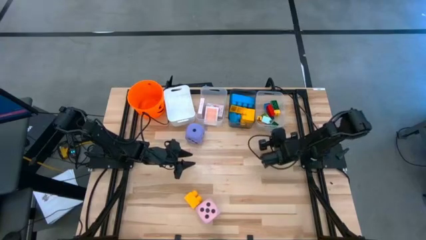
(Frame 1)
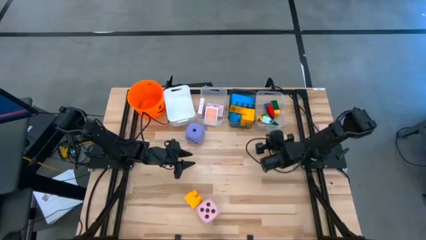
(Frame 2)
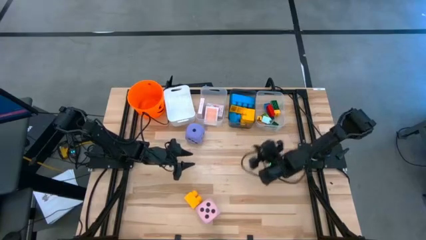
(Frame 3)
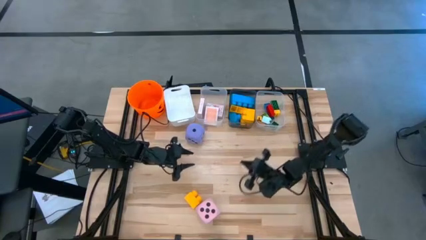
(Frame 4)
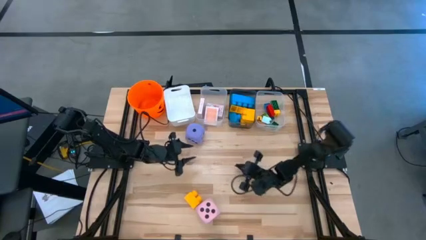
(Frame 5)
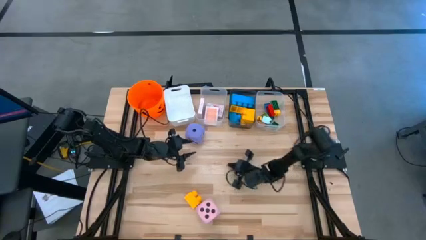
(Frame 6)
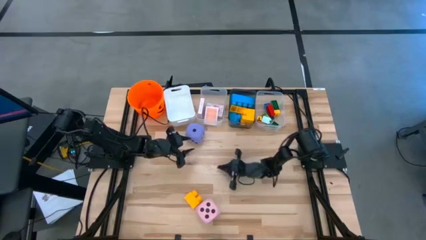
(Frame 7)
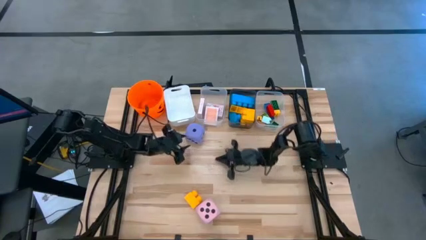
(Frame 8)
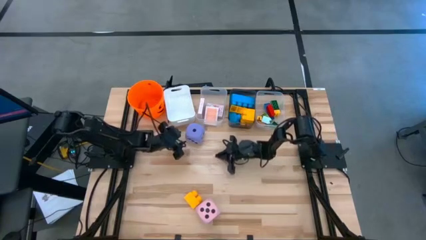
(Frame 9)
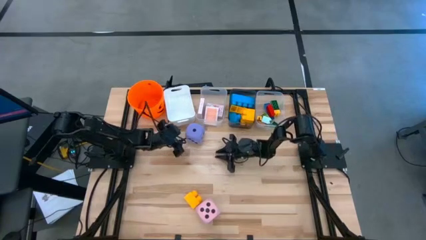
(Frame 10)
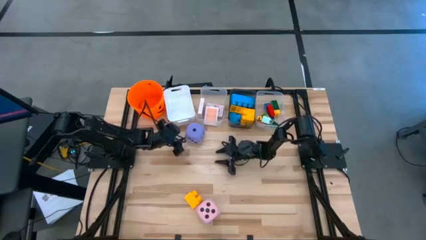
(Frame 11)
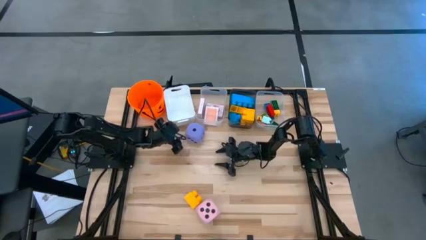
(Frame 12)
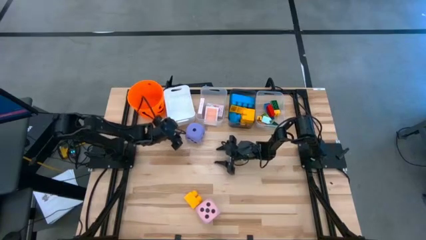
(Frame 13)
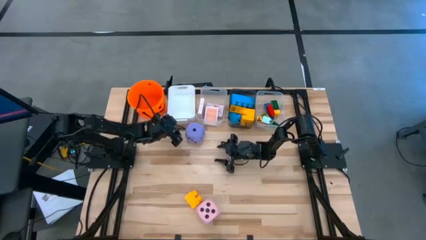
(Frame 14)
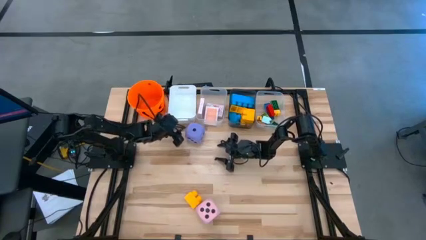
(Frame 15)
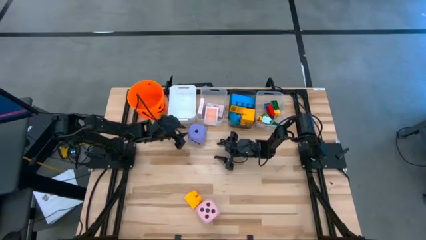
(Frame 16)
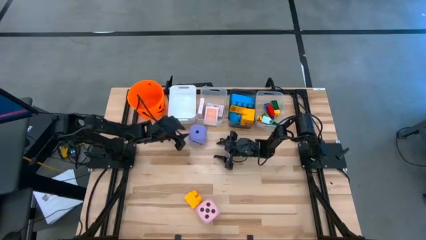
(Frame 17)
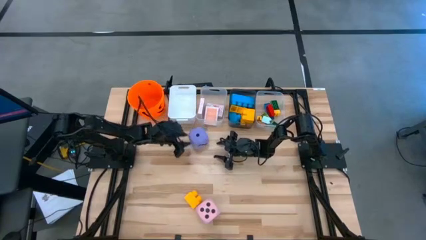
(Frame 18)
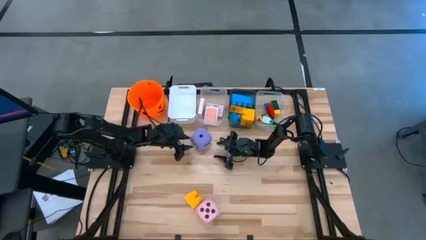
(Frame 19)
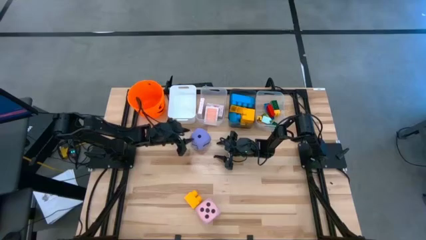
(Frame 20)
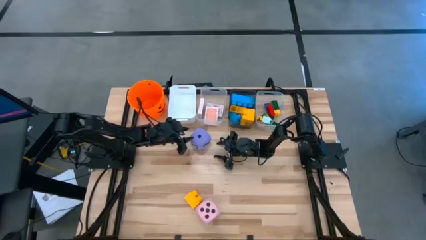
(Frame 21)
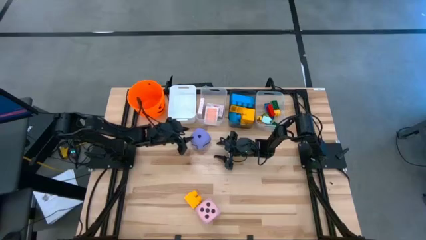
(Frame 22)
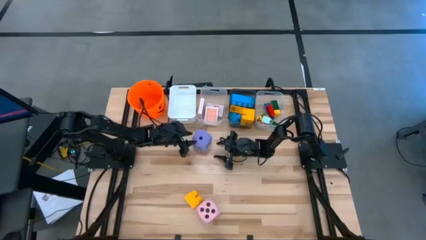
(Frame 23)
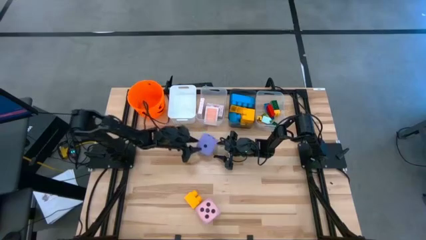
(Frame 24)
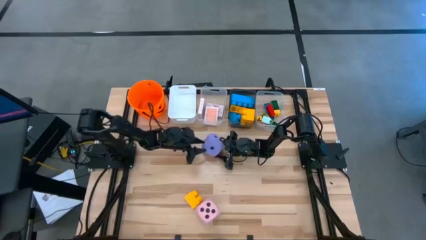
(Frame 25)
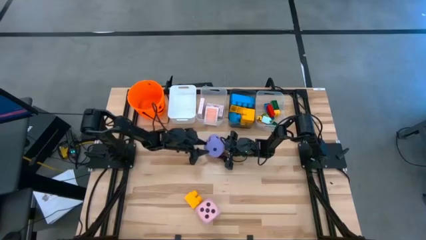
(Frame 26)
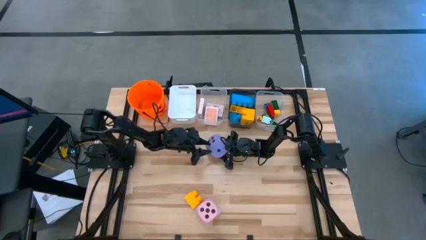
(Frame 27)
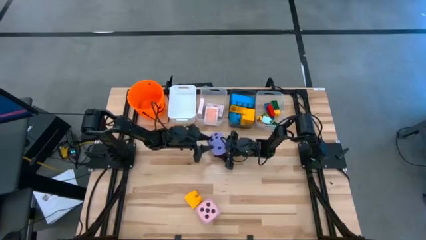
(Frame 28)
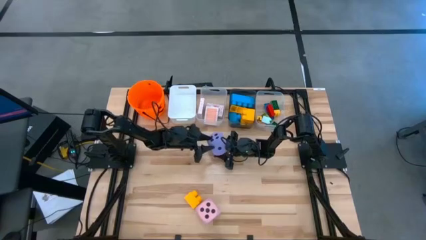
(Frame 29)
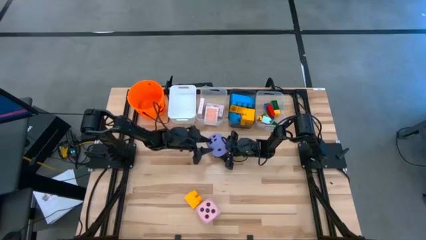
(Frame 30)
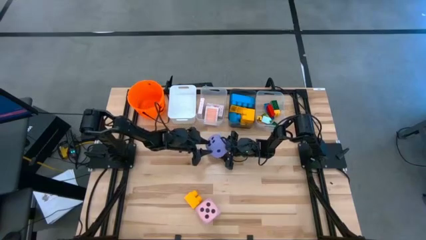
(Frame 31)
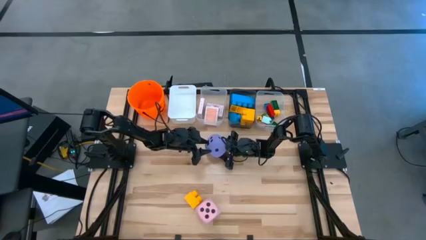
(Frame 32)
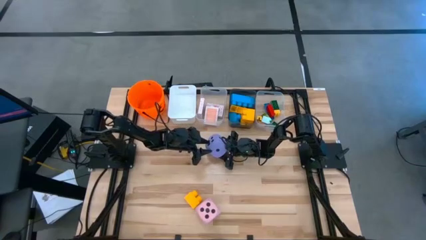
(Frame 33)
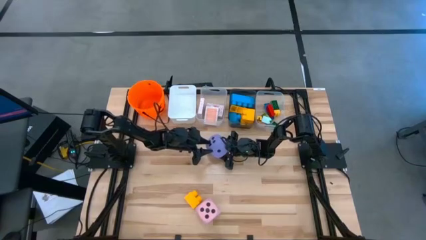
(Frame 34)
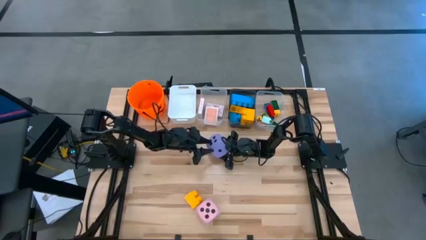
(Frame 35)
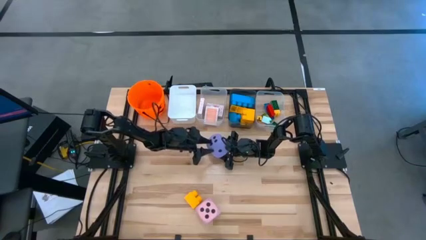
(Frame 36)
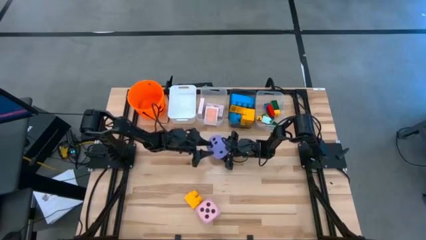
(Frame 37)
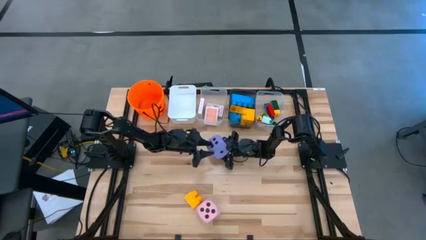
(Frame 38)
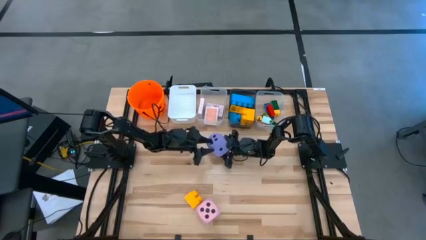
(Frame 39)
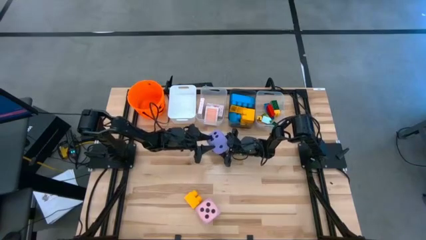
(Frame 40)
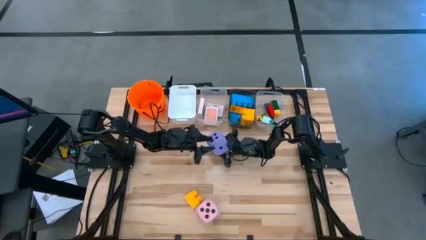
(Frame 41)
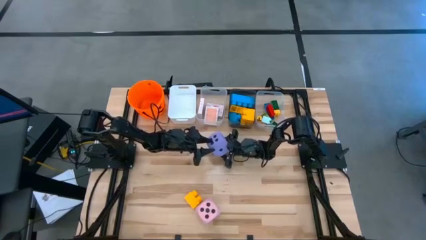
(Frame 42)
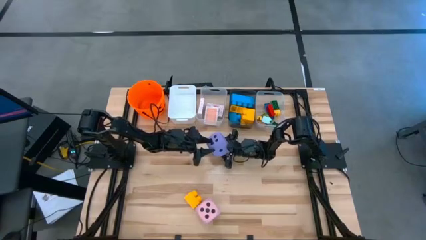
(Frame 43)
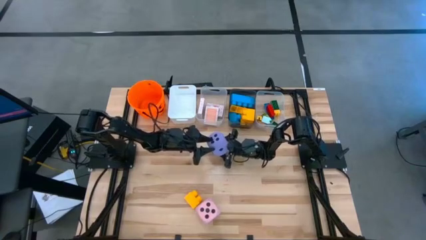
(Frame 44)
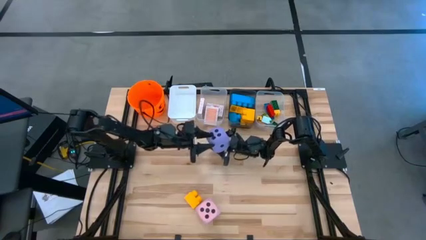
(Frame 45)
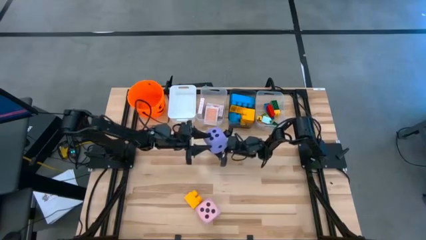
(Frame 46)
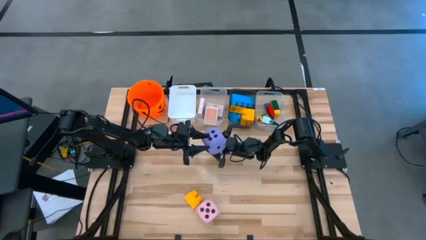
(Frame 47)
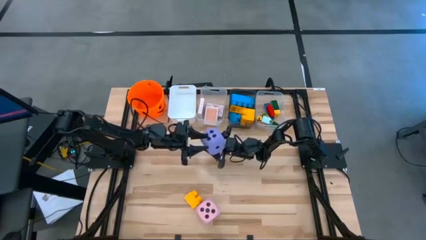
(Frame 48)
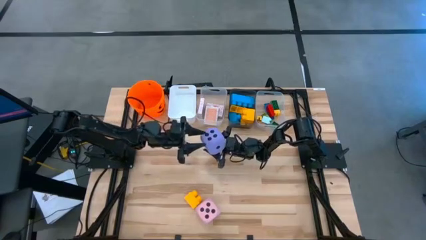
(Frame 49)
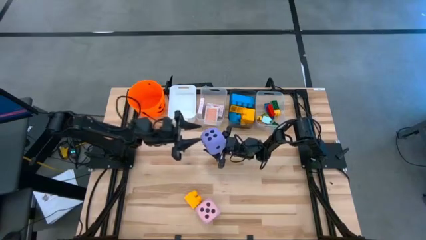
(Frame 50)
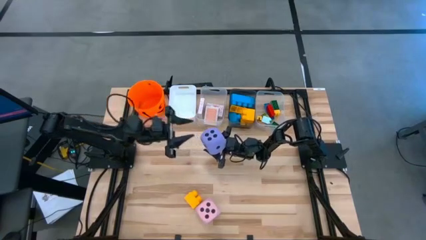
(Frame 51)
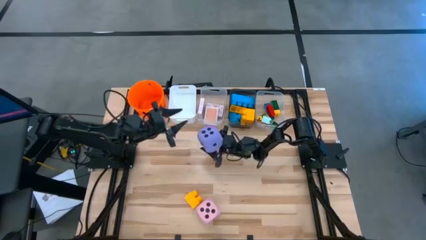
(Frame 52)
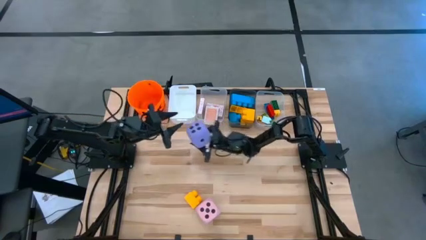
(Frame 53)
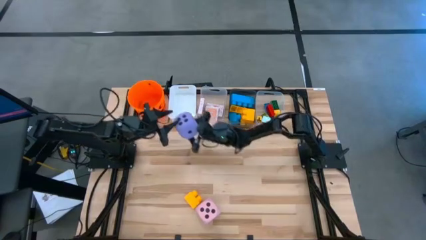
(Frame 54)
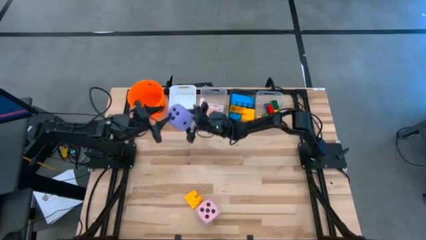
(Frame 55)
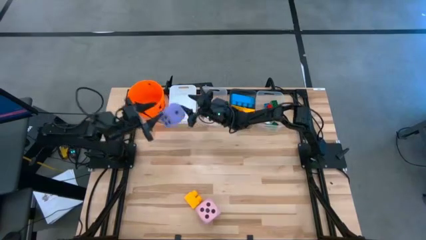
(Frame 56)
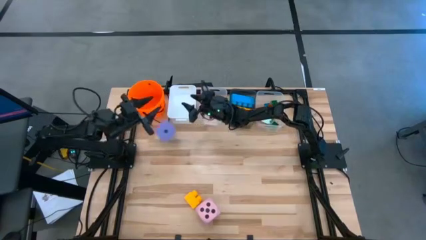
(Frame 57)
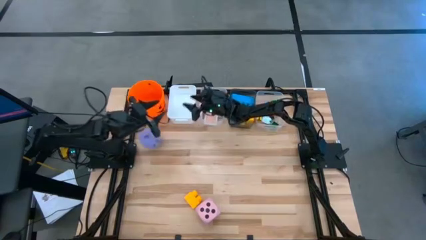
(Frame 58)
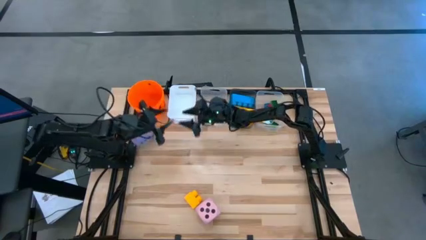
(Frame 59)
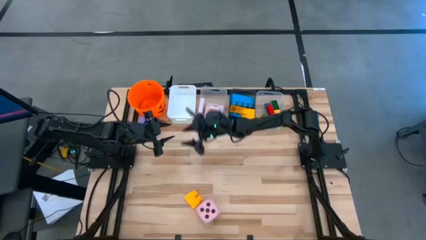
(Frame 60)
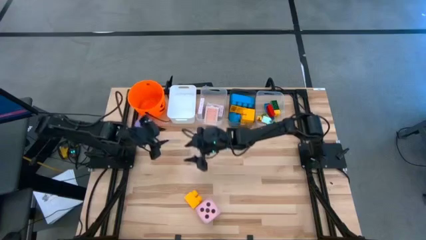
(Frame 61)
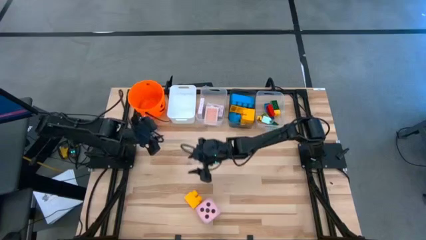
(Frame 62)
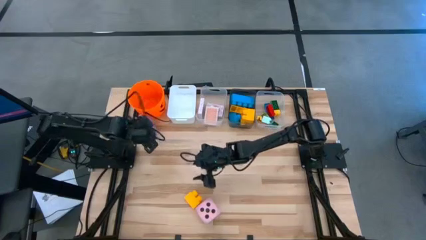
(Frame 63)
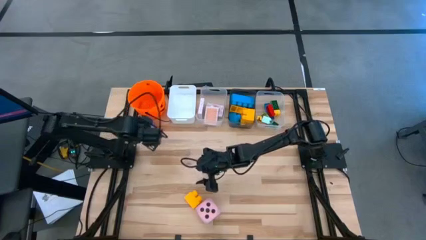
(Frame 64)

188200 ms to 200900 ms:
Task: Pick & Place Toys
Put the purple die into the white bin

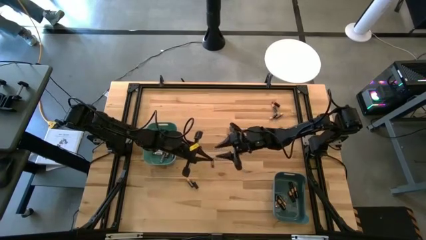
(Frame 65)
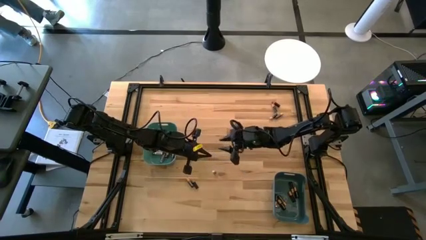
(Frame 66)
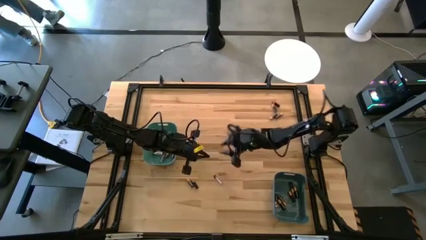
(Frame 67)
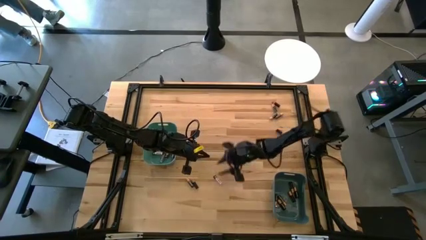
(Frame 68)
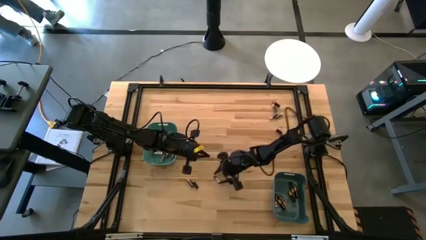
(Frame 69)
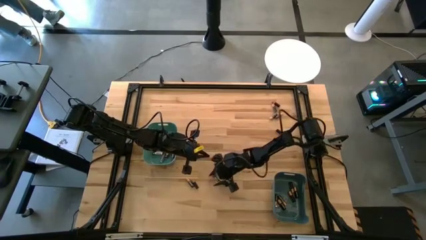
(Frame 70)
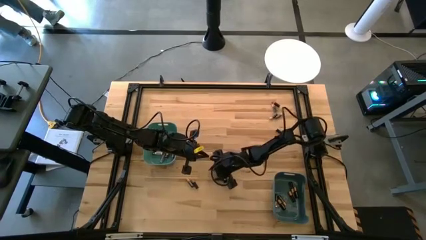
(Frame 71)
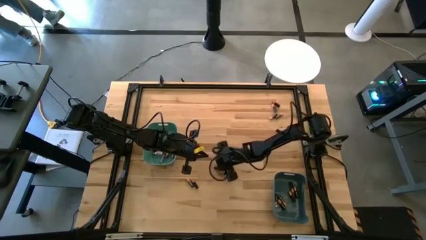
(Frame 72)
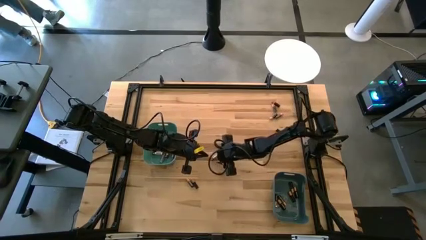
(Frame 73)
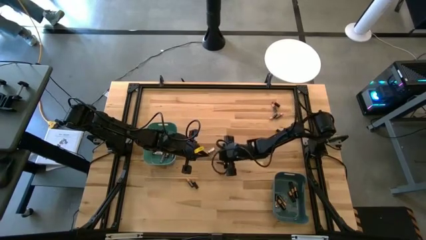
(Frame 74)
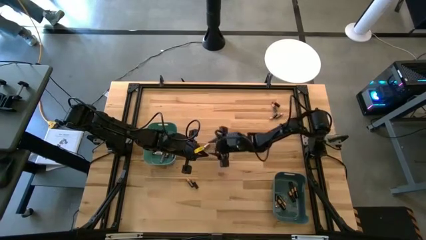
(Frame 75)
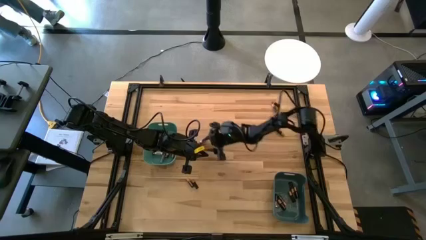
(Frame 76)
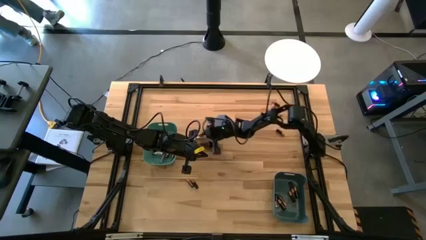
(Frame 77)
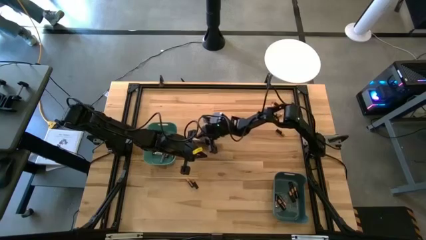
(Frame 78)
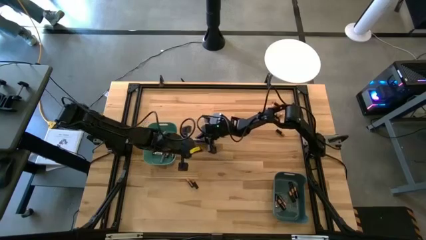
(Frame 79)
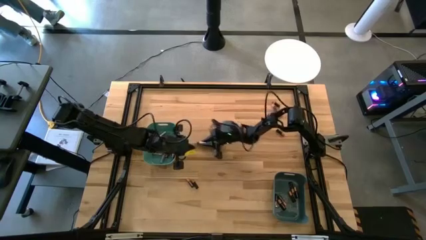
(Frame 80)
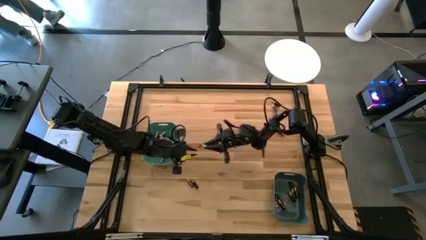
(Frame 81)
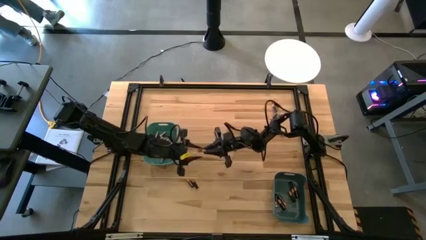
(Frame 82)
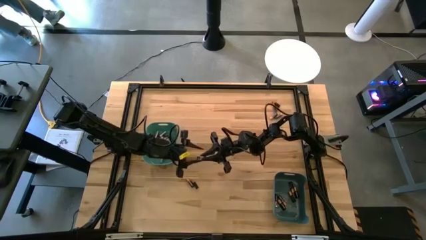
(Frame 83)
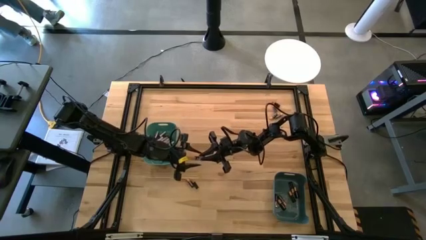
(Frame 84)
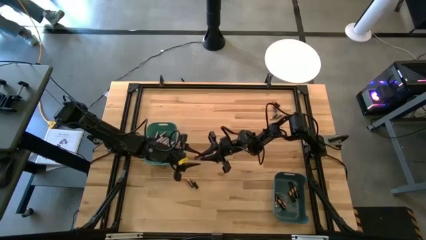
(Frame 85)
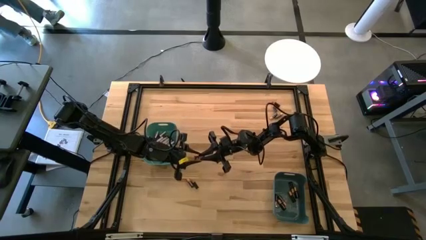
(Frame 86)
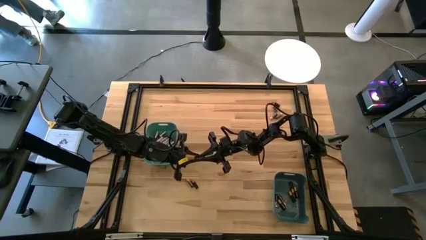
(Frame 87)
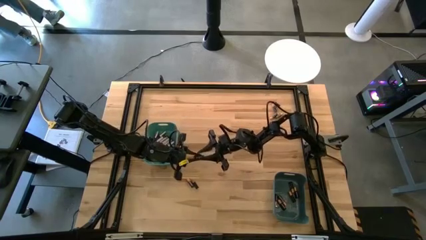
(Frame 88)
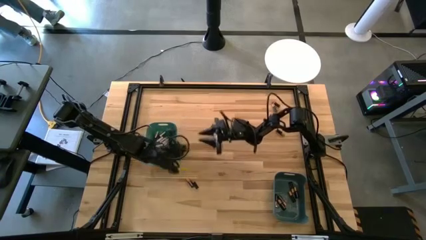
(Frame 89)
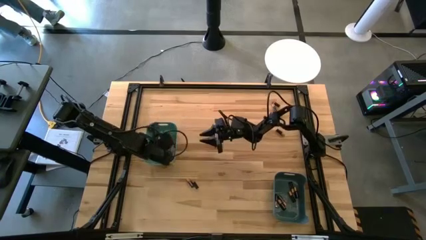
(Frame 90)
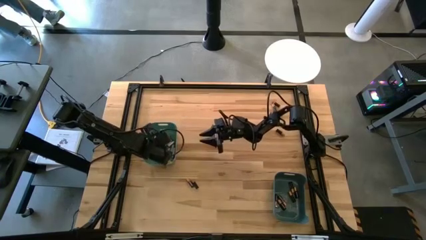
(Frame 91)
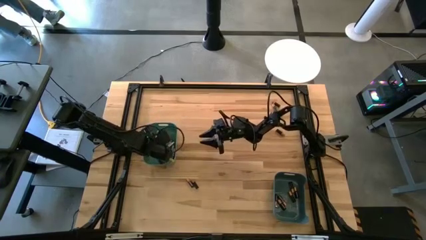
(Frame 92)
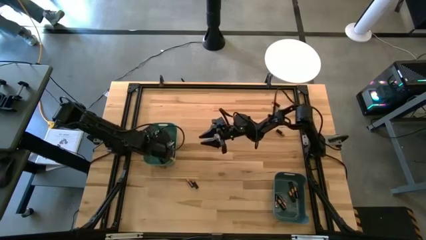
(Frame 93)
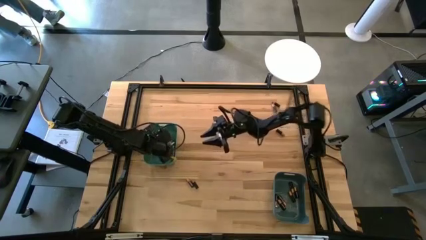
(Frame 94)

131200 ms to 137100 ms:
Task: Sort batteries
Put the silver battery into the green bin
